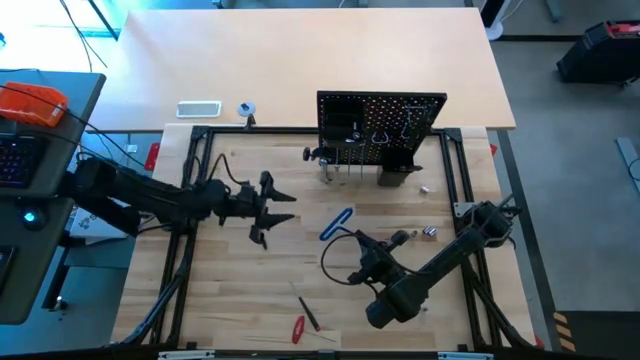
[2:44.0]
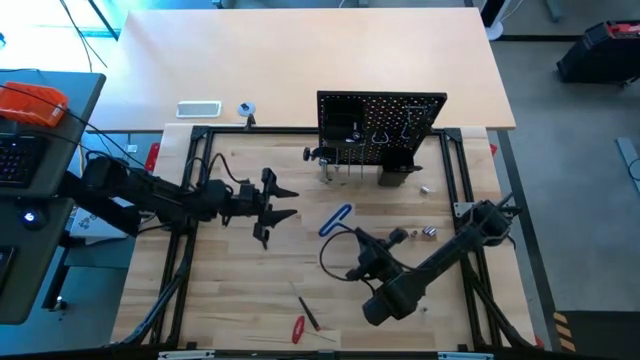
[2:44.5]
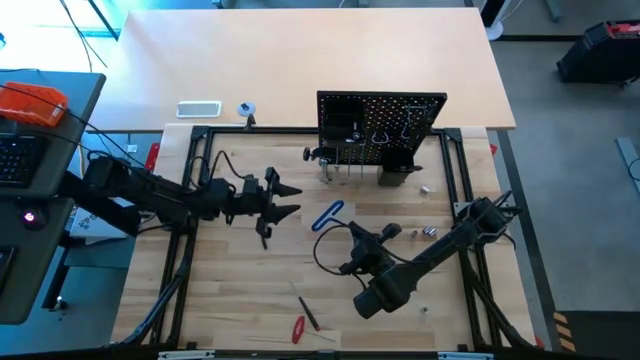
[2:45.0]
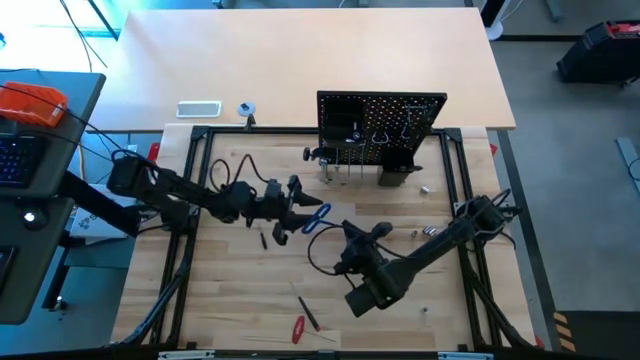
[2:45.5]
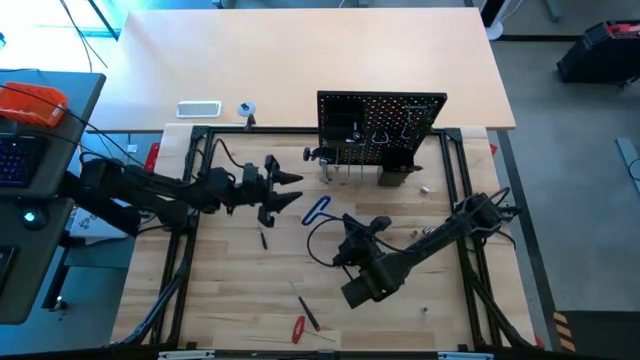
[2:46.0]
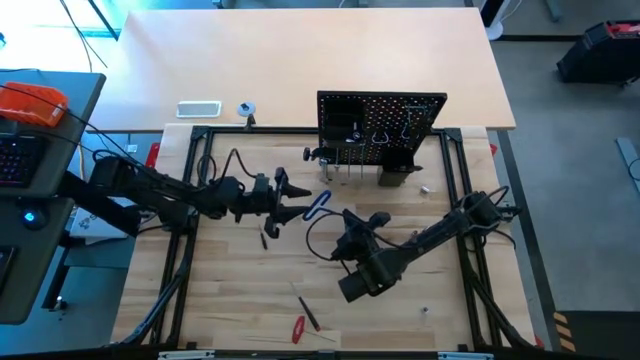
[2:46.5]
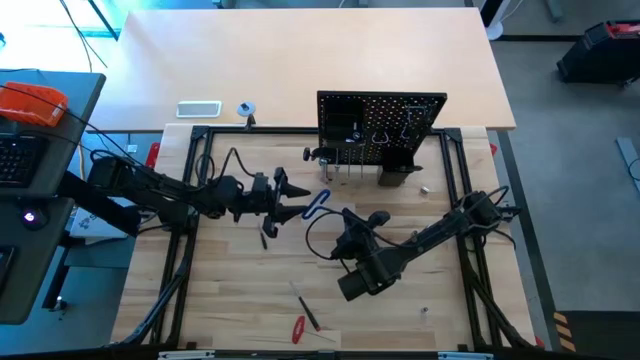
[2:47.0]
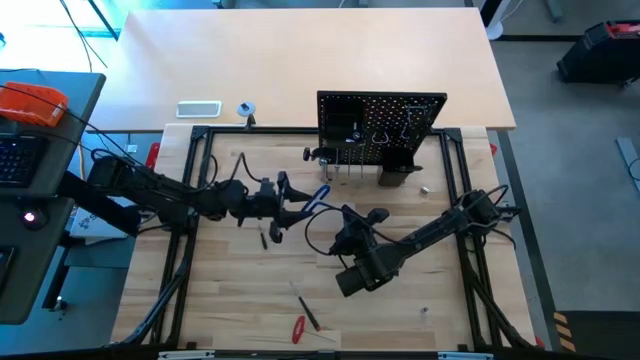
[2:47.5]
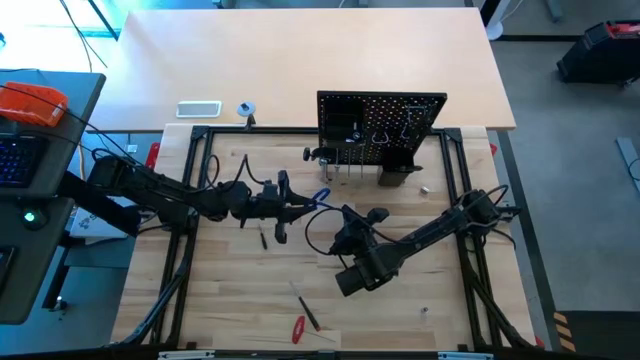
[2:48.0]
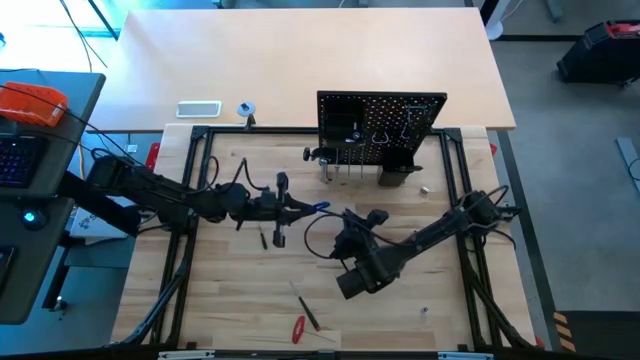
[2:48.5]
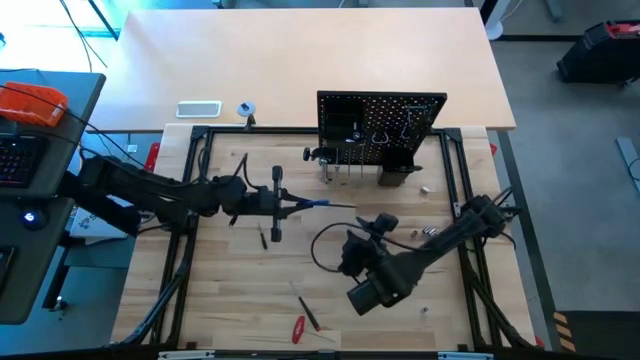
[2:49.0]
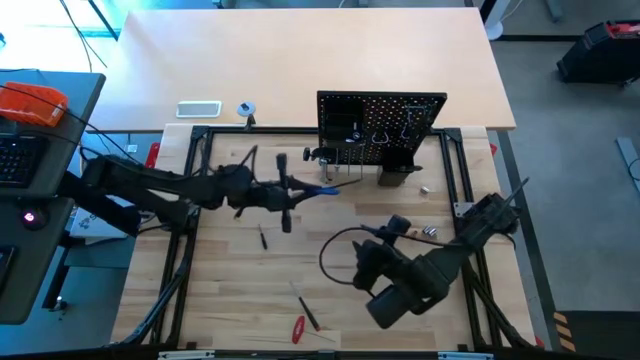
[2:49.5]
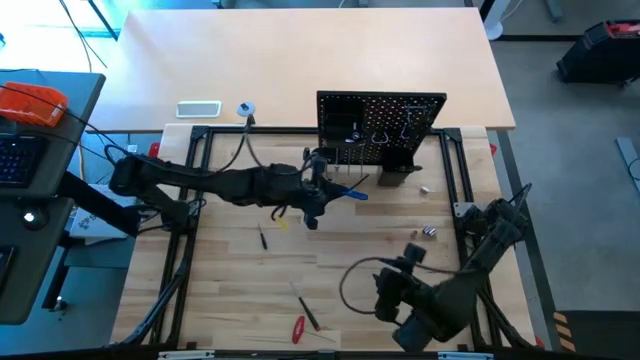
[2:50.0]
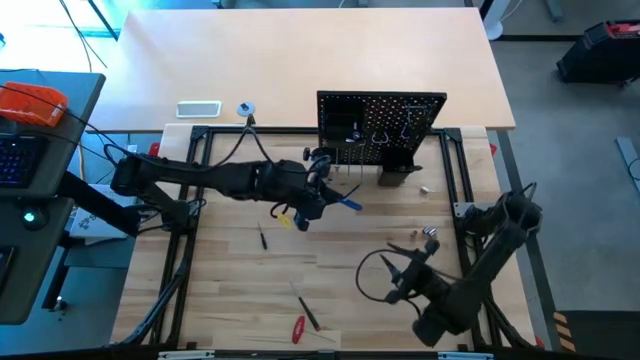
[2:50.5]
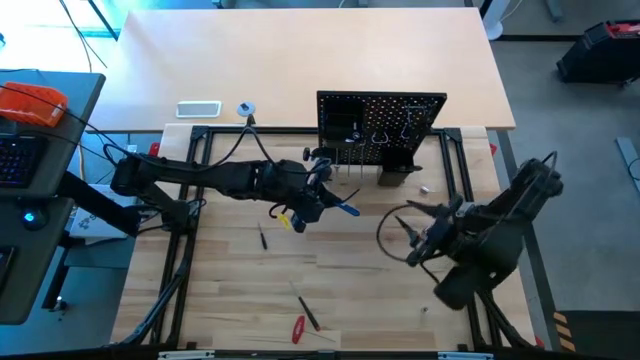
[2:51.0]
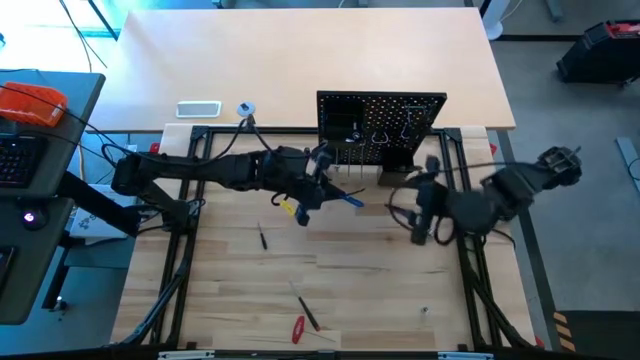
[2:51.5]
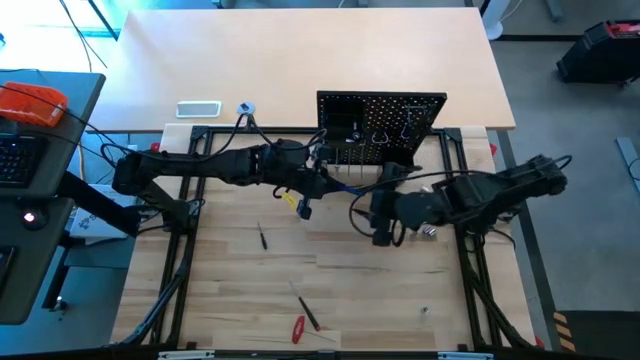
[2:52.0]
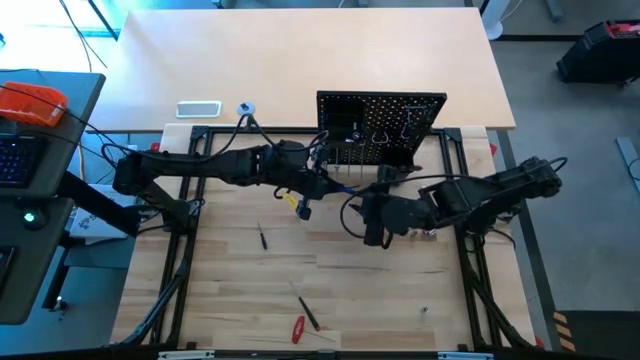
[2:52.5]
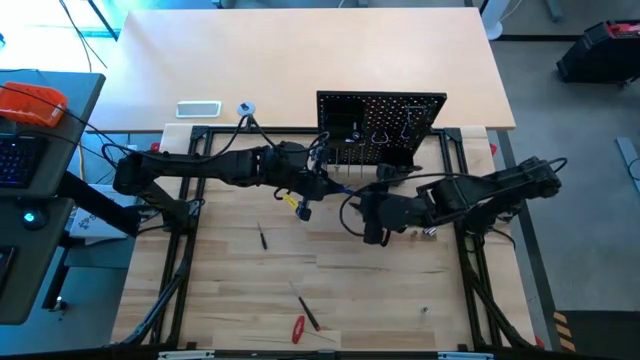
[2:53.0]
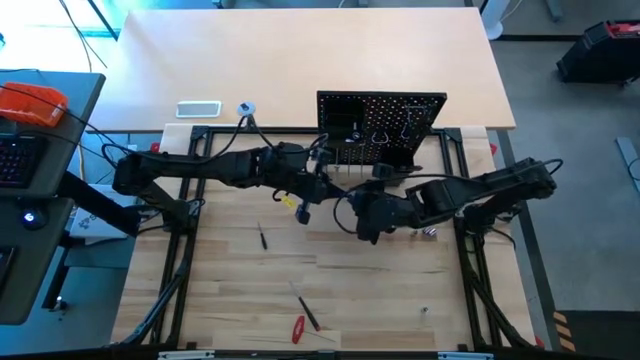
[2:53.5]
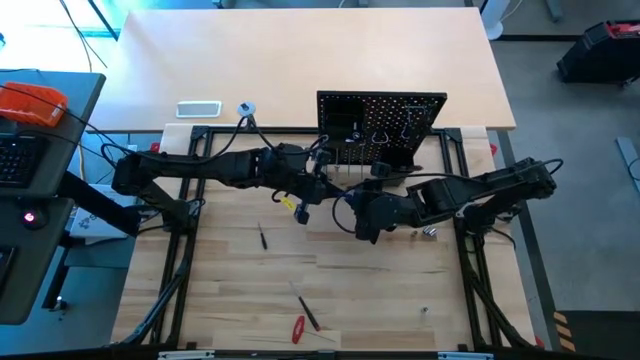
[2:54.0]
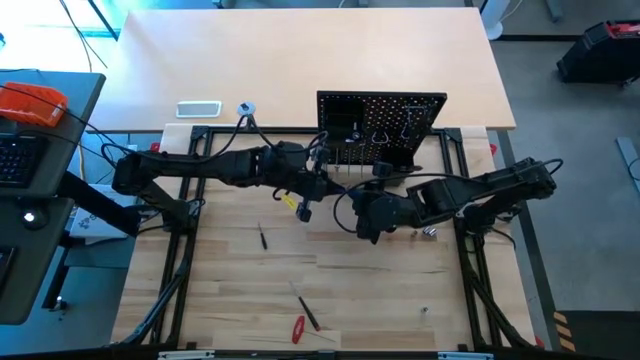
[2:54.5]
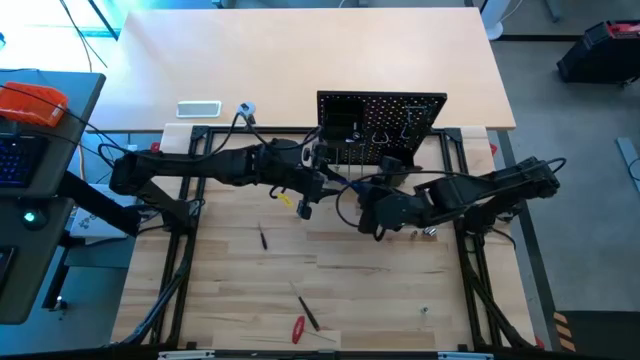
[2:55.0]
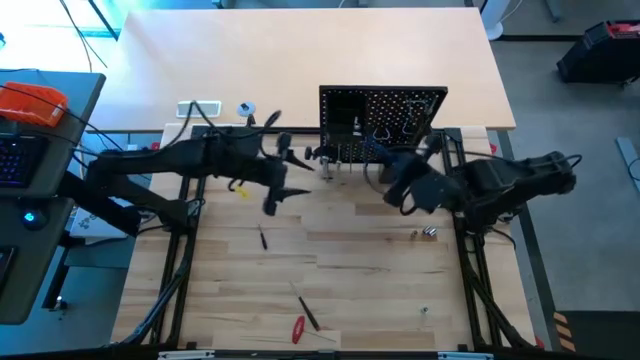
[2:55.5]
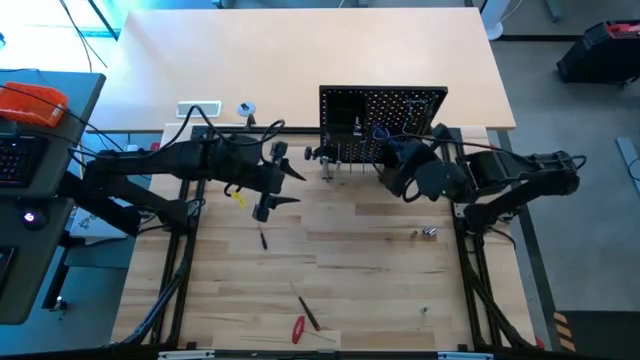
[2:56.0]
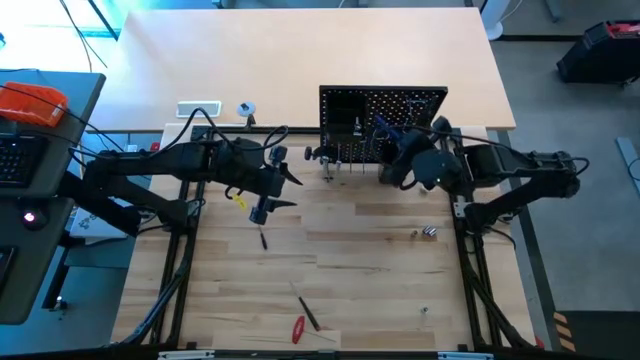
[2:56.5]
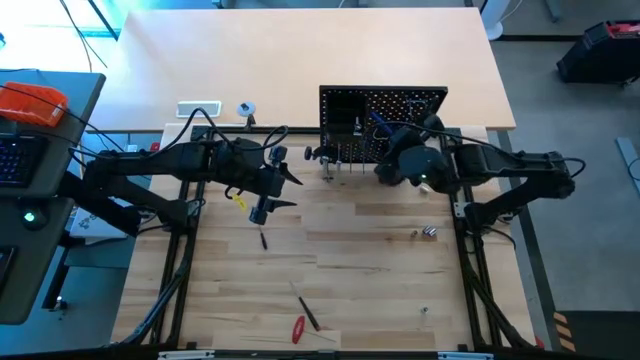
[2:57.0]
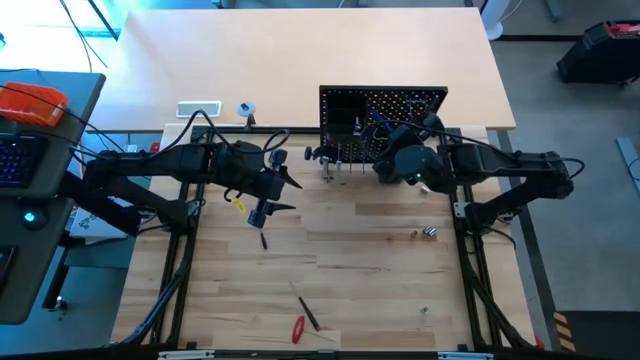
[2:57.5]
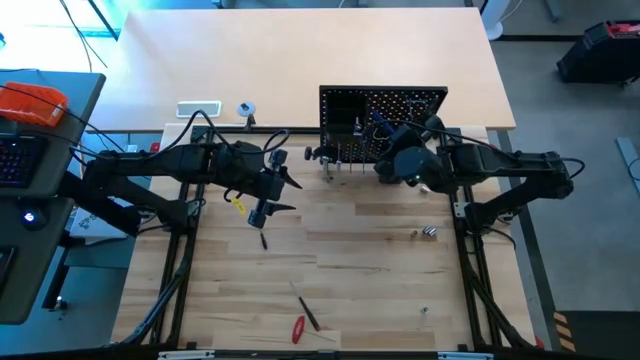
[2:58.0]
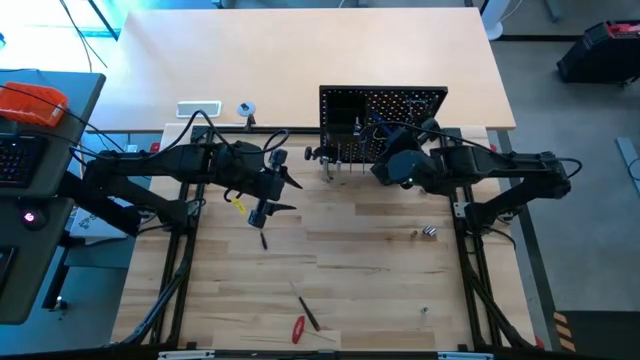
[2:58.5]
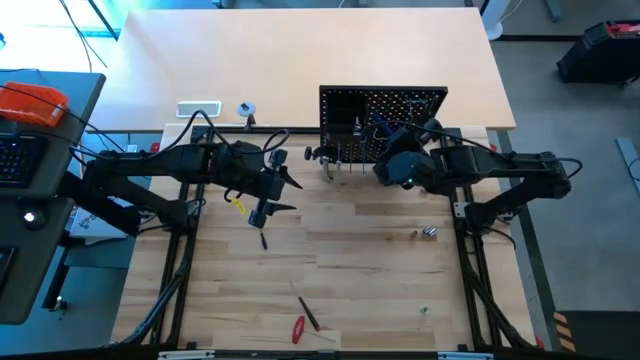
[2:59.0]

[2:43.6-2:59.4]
Task: Hang tools onto peg board
Hang the blue L-shaped hex key onto the pegboard

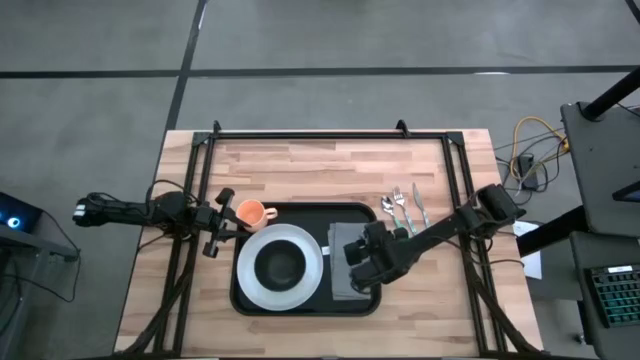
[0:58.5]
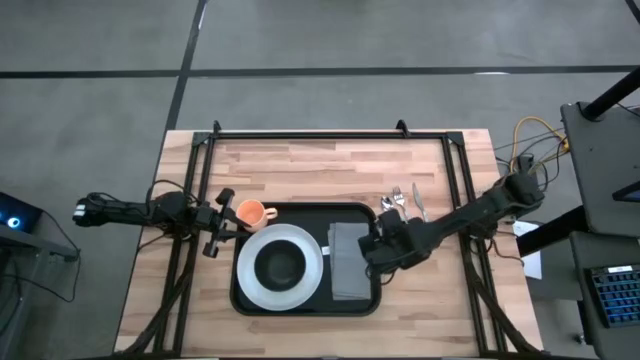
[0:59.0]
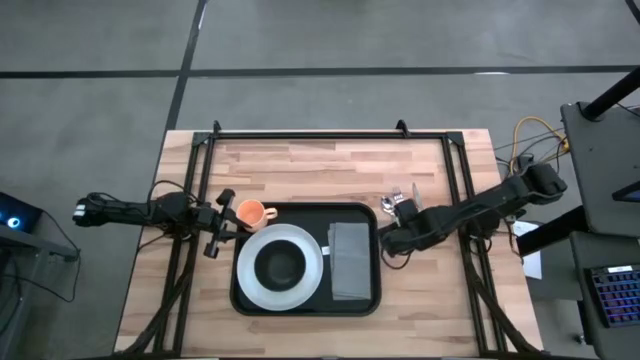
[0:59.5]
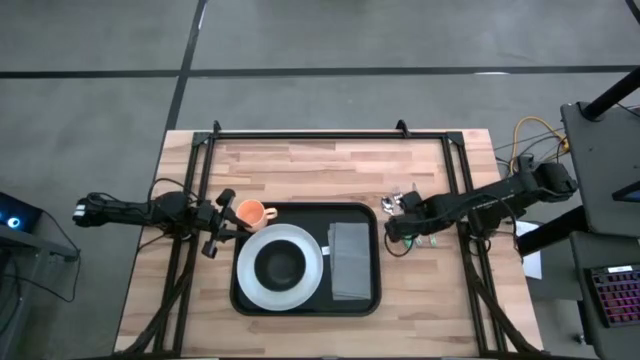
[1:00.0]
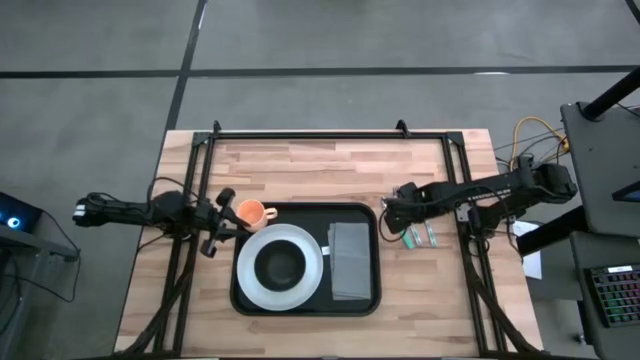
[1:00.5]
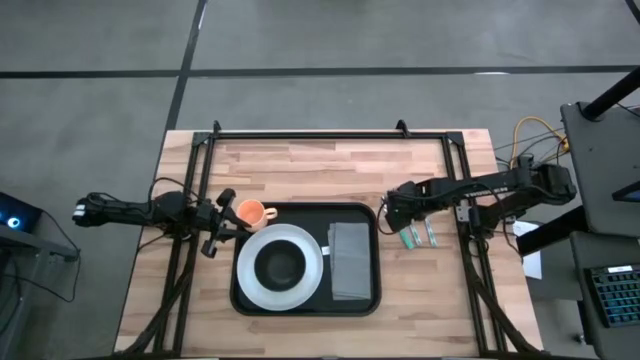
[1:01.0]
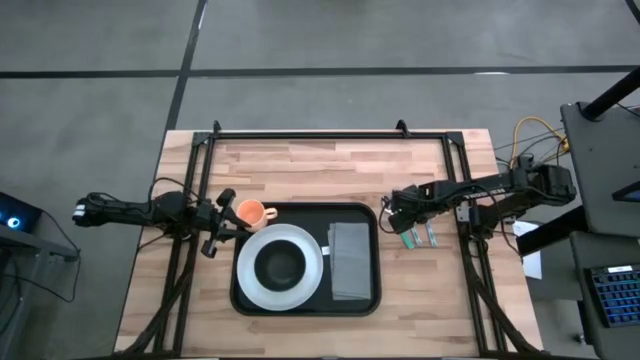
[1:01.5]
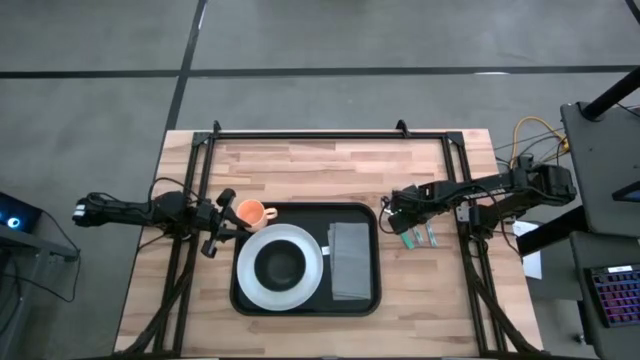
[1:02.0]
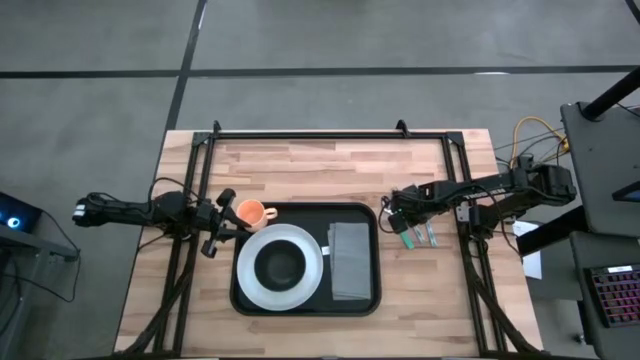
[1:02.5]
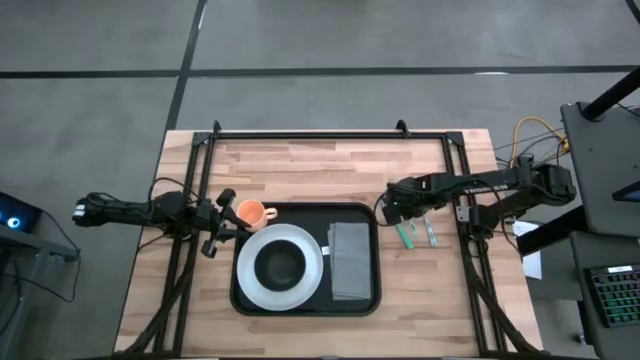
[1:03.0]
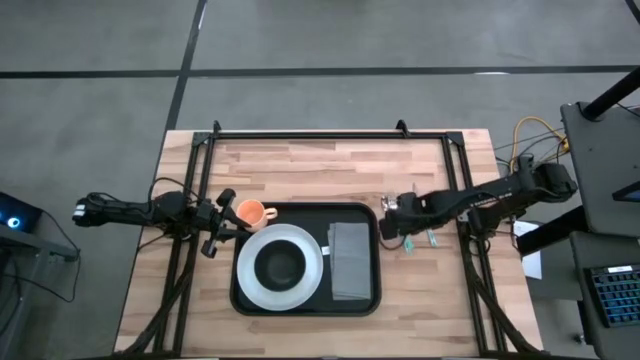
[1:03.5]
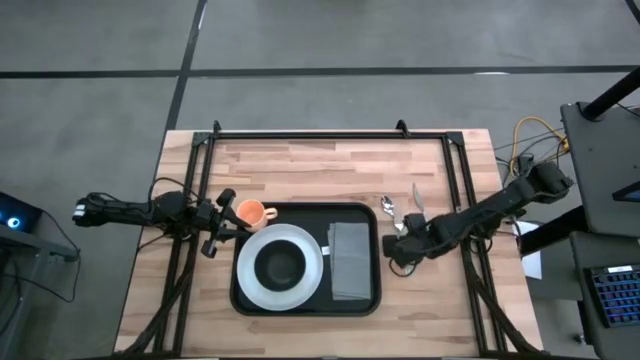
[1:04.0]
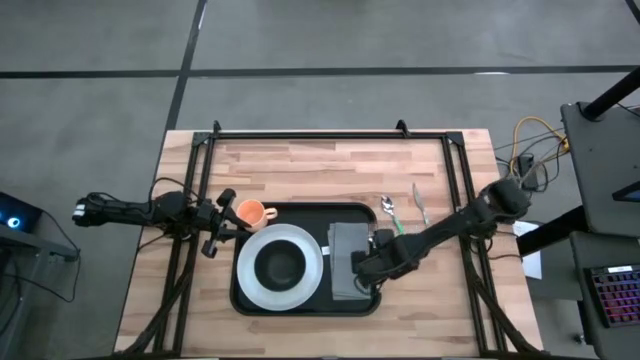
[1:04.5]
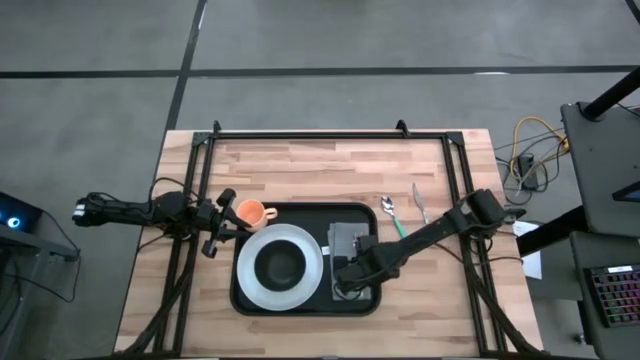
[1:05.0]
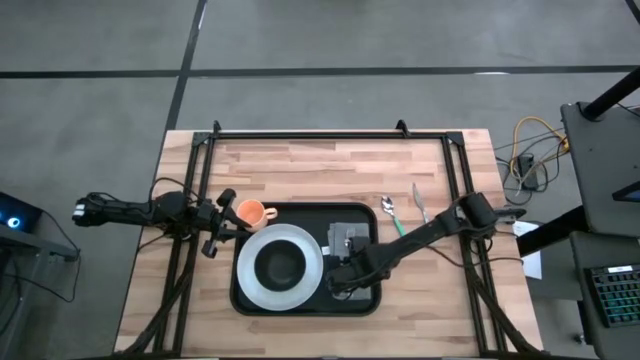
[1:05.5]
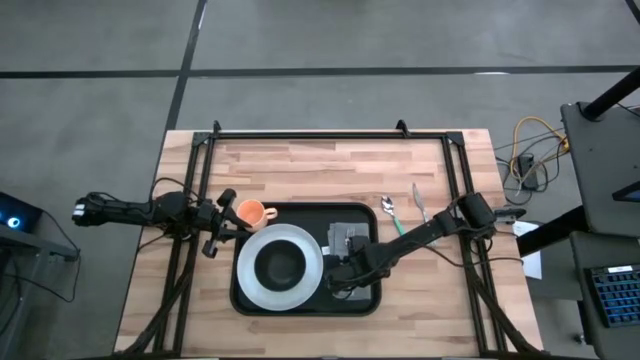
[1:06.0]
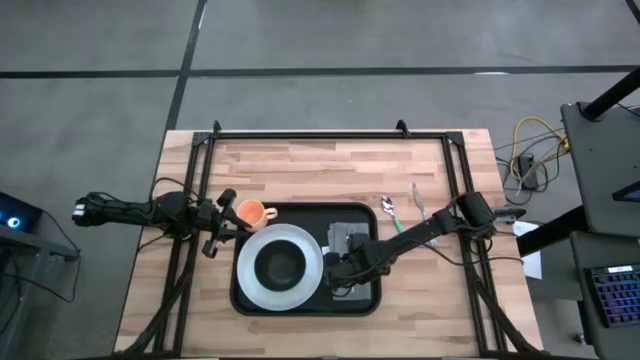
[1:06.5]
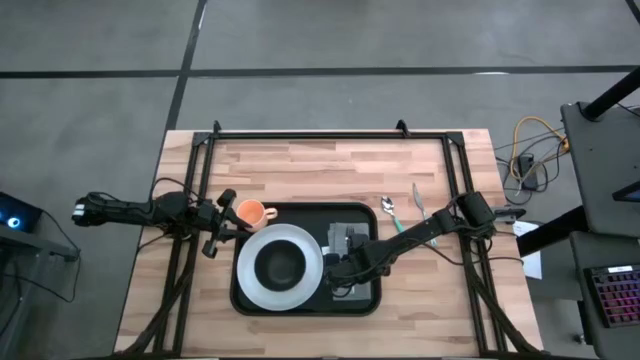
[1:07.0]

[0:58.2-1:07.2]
Task: Set up tray
Put the blue fork on top of the gray table napkin on the black tray
